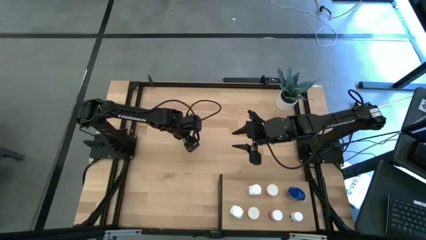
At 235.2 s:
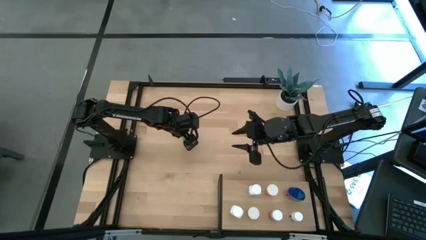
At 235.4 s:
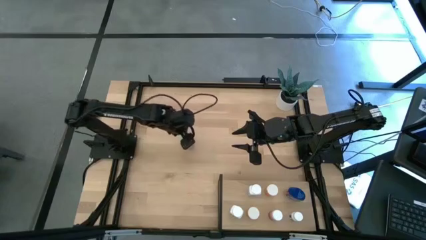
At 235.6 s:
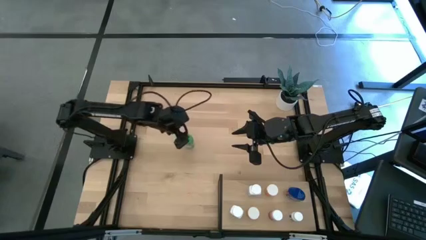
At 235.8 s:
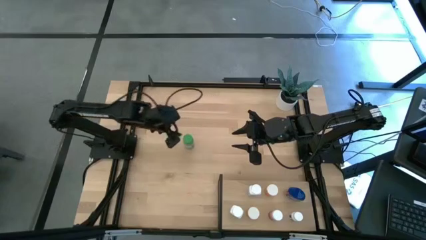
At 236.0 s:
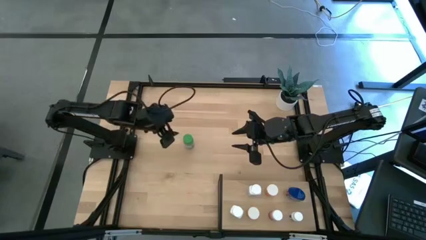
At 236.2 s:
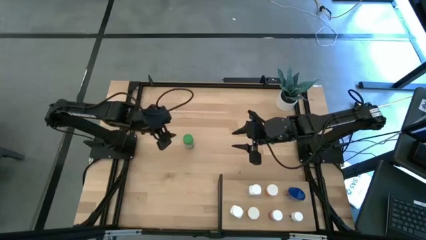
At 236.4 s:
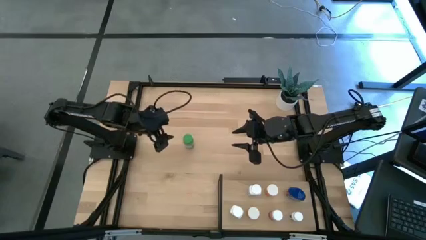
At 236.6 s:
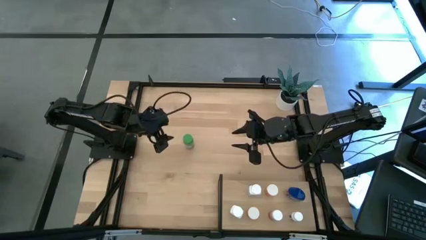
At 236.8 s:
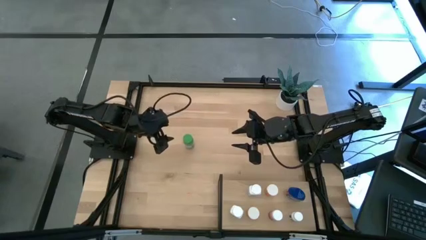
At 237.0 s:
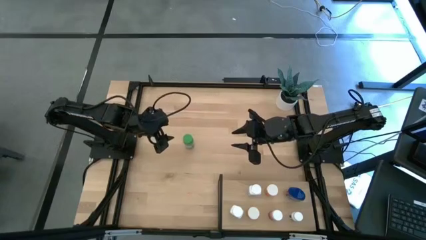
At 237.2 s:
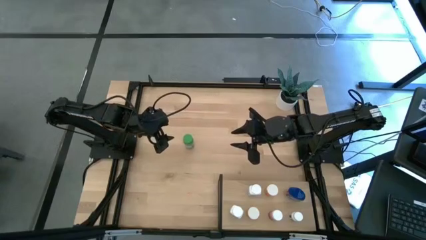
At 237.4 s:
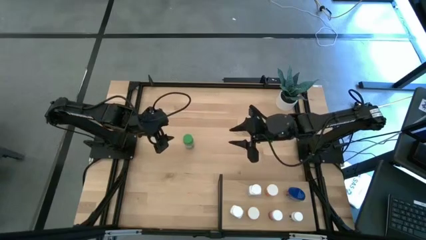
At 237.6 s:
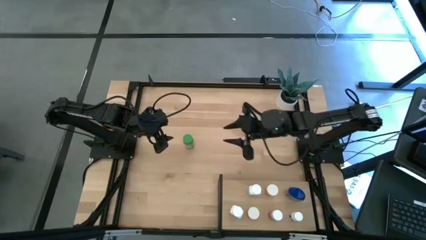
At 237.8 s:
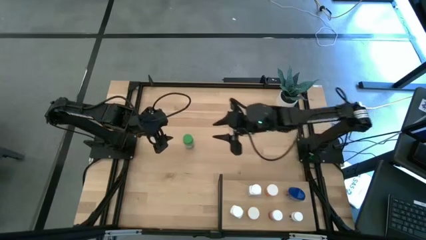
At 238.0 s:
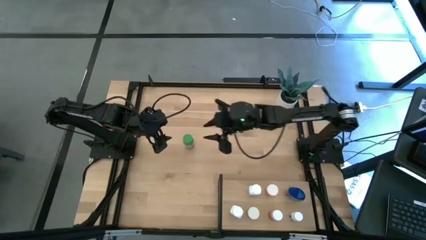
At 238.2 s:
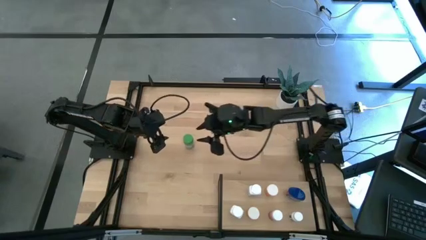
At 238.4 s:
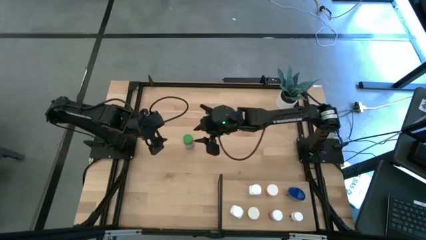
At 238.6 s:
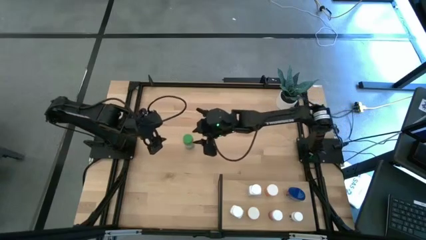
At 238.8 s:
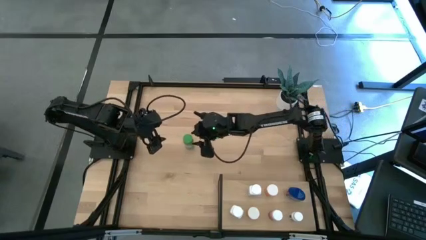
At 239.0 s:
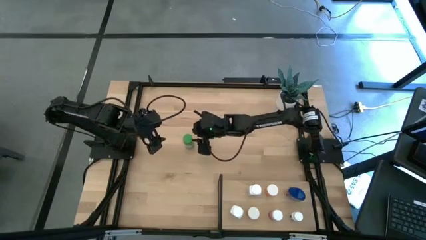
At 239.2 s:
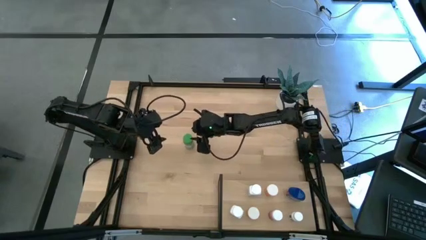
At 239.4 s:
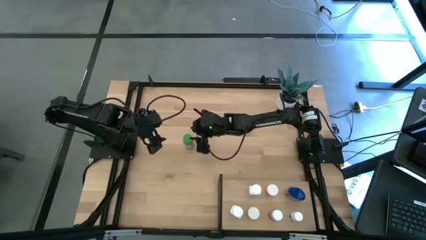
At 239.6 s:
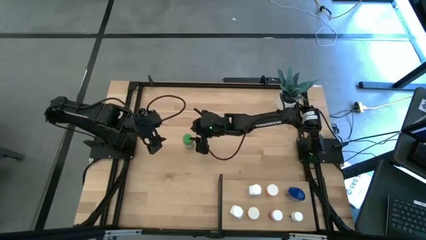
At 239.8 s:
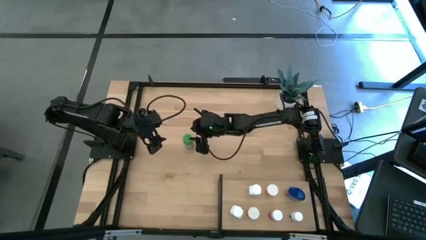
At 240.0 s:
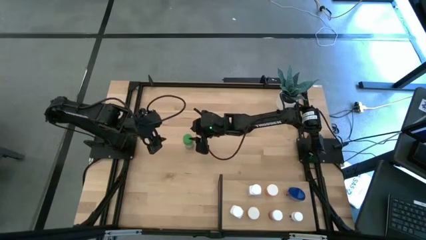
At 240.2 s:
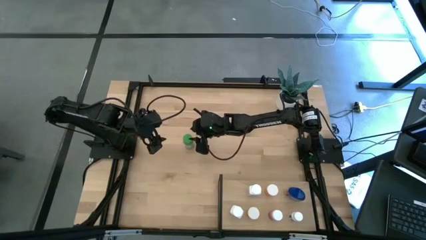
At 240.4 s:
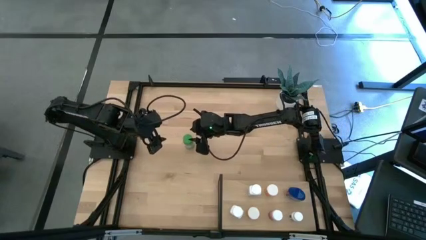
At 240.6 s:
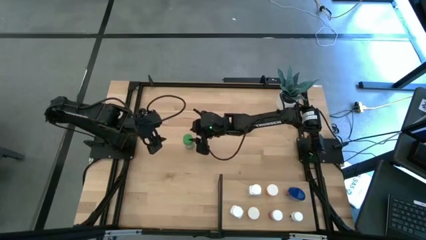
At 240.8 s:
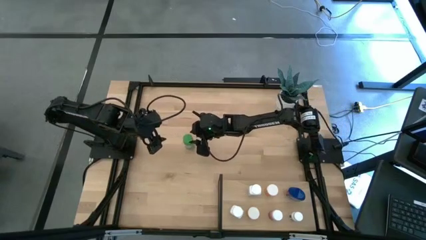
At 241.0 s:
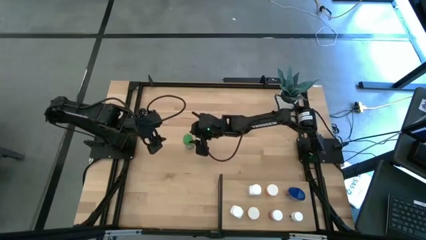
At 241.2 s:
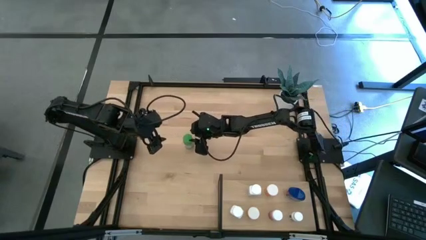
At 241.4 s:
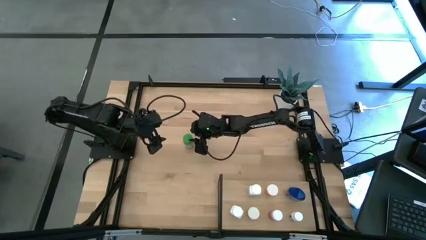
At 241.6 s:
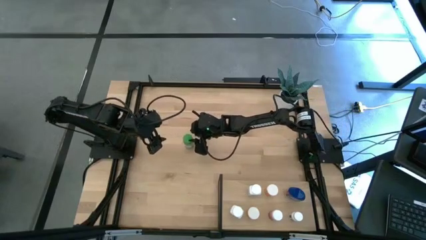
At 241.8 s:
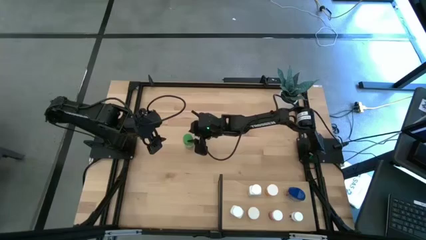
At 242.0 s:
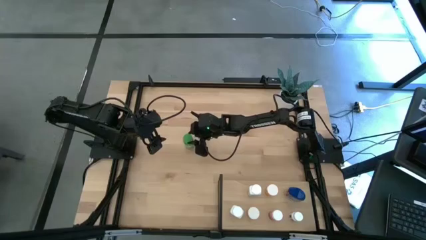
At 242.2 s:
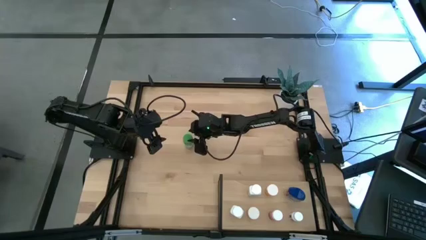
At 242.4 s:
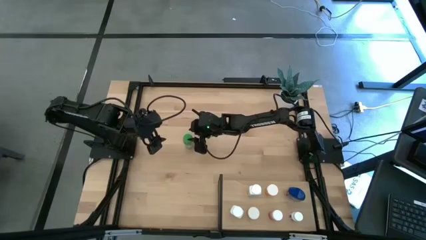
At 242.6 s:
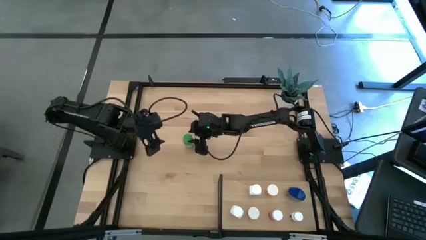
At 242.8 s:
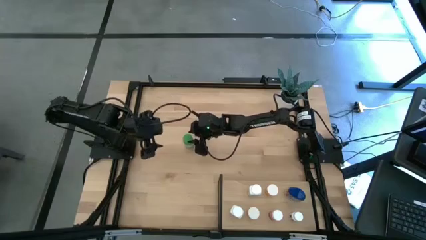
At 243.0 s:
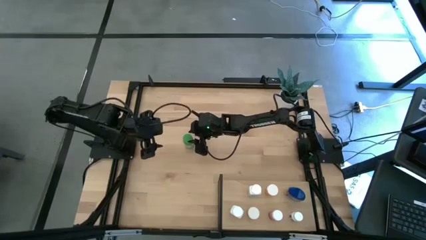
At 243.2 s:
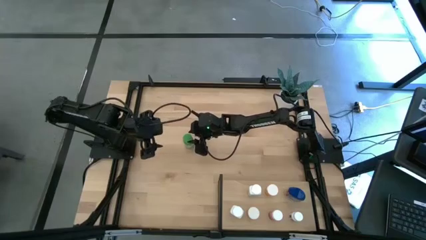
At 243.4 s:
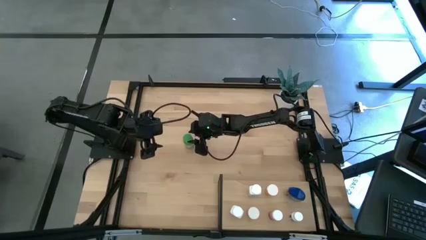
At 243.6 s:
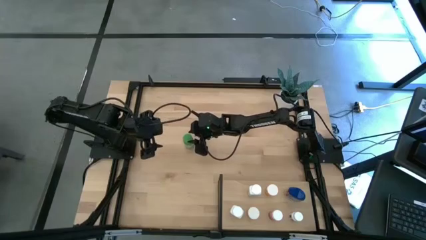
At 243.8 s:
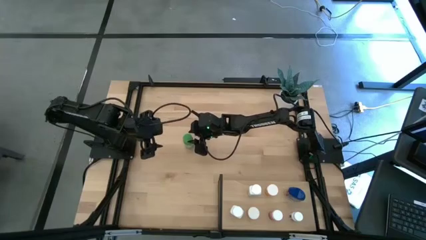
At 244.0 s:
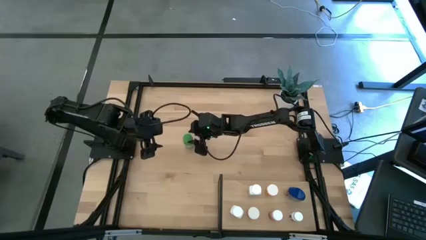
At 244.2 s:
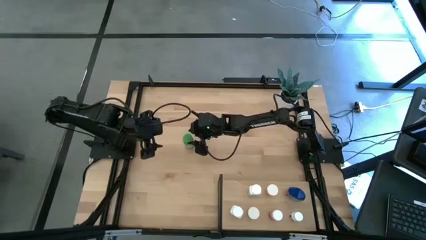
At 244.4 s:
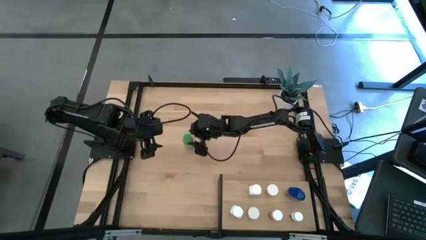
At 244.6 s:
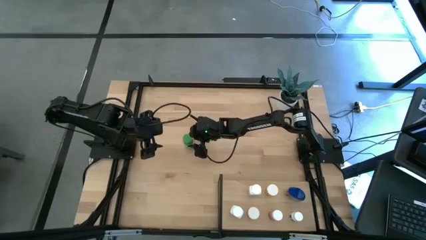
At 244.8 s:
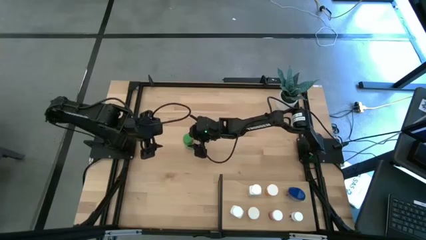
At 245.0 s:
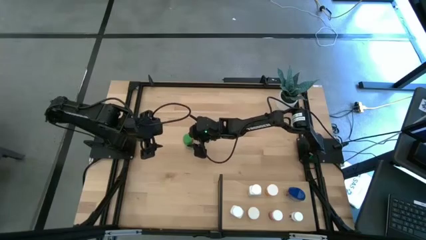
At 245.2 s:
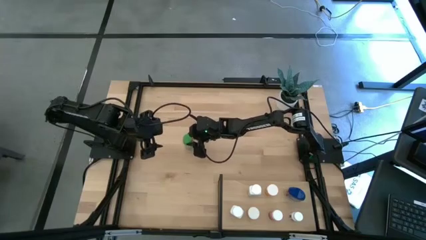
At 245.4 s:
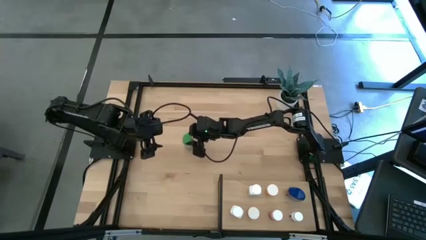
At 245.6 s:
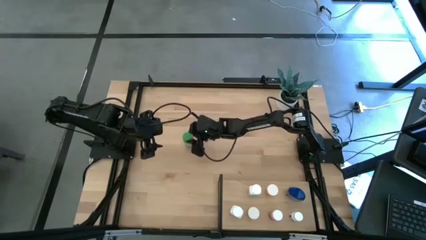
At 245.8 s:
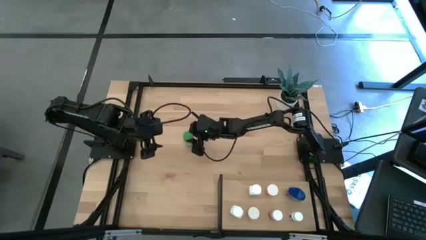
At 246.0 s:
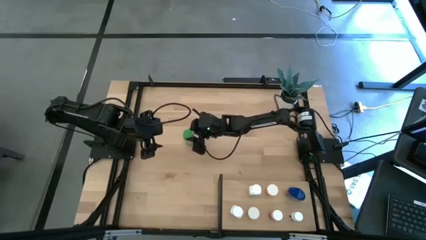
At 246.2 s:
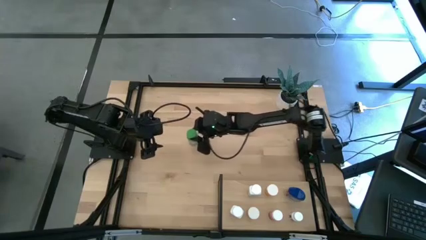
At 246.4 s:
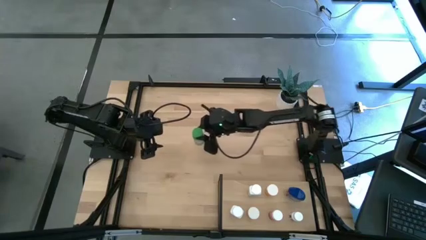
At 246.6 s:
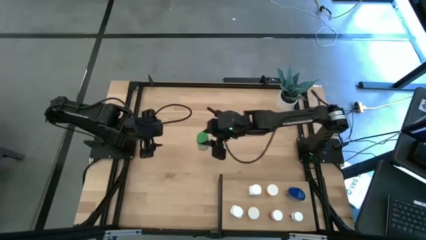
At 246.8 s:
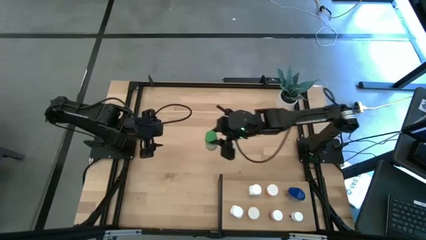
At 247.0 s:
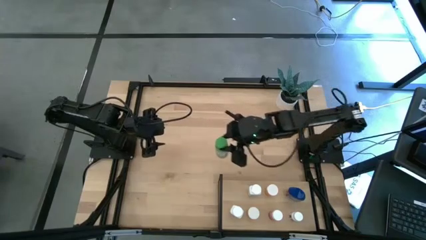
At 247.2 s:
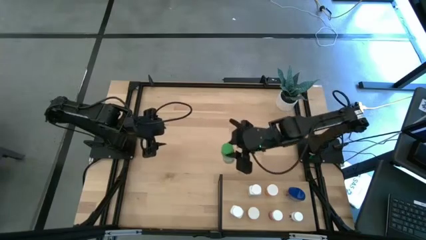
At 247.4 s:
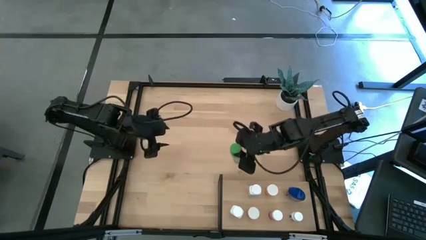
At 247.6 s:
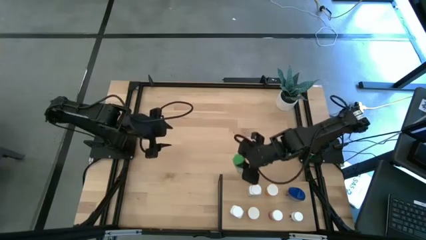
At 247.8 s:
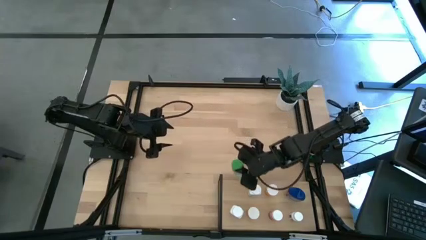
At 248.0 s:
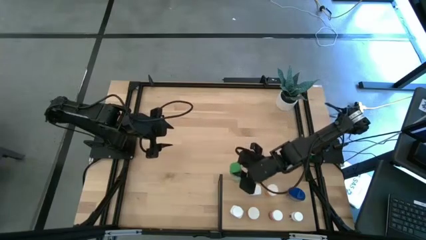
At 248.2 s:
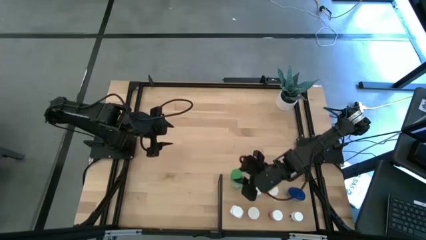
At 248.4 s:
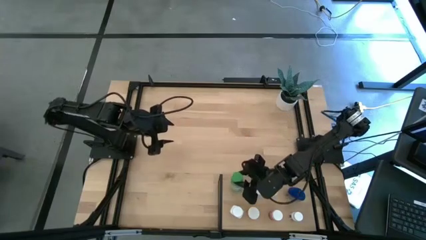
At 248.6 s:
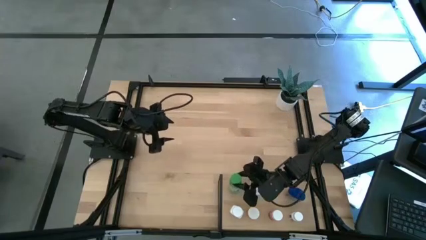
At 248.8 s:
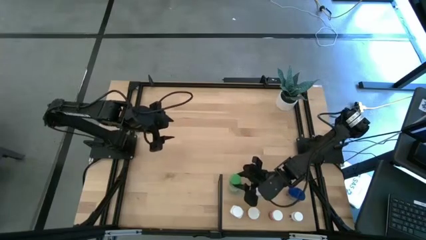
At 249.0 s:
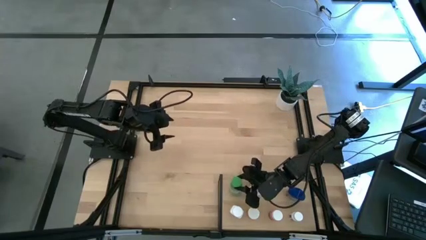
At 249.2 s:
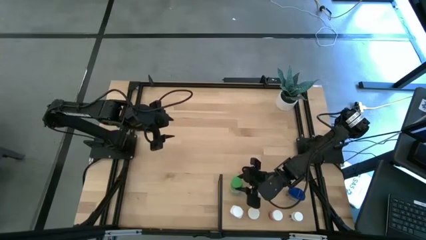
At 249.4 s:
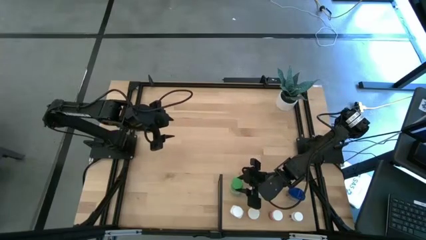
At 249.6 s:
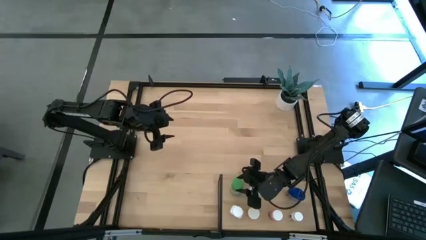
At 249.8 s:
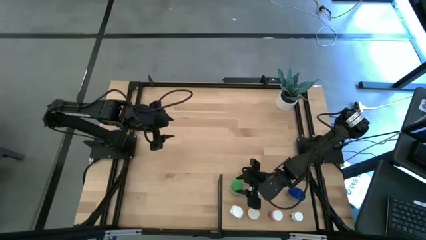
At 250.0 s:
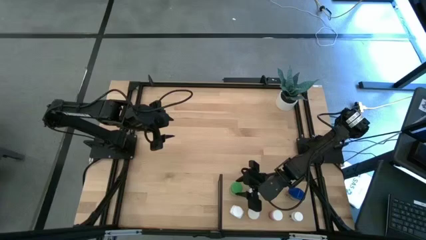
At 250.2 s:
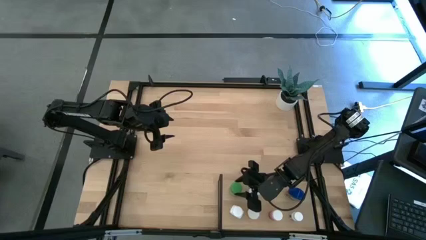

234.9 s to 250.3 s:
Task: Pick and place medicine bottles onto shelf by color
Put the green pill bottle onto the shelf
